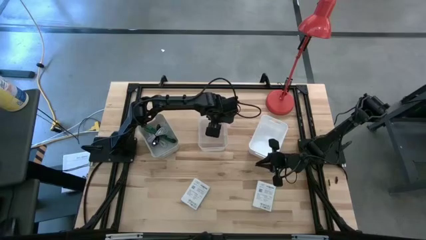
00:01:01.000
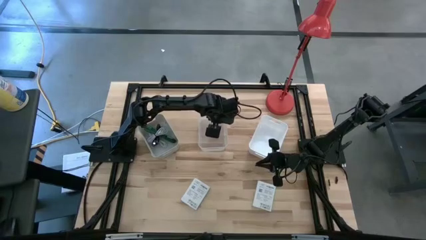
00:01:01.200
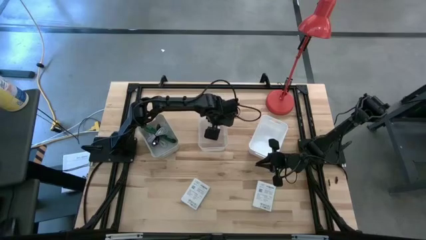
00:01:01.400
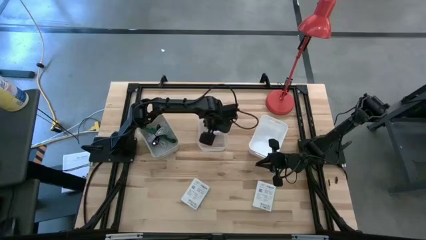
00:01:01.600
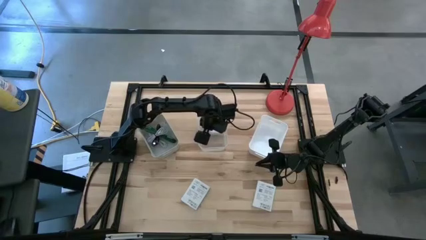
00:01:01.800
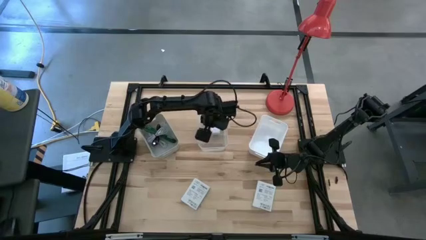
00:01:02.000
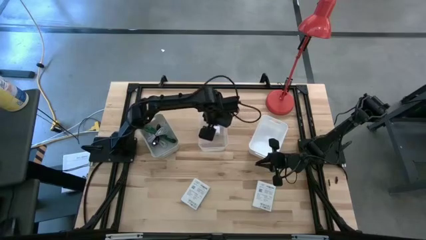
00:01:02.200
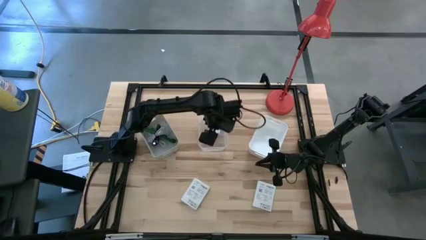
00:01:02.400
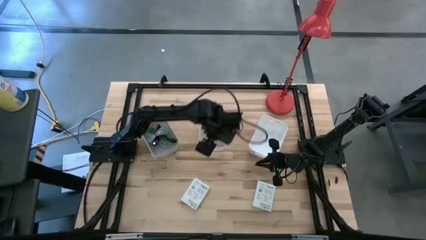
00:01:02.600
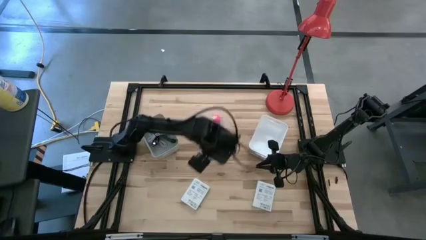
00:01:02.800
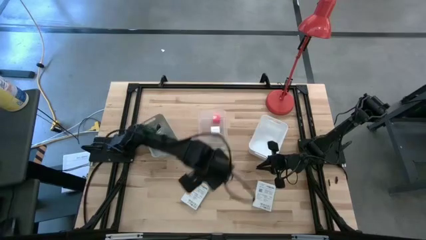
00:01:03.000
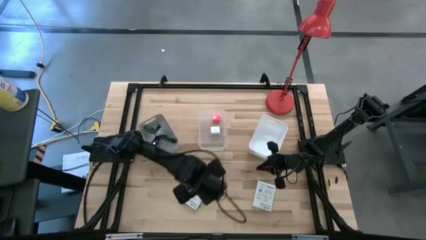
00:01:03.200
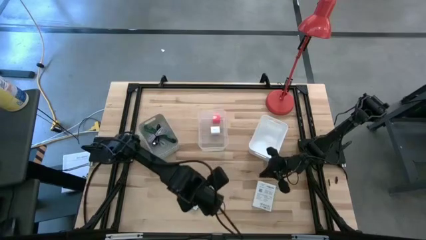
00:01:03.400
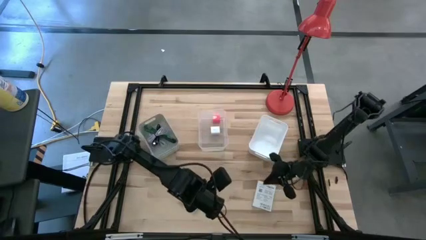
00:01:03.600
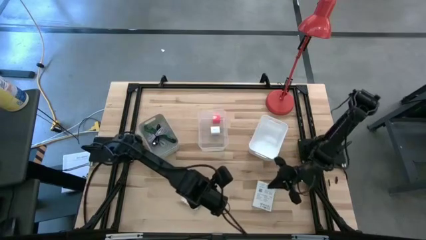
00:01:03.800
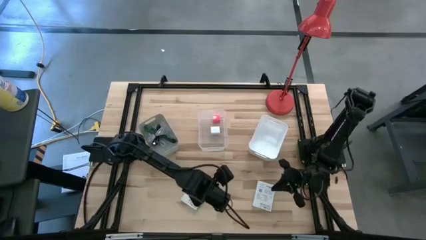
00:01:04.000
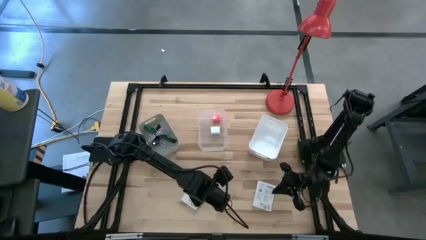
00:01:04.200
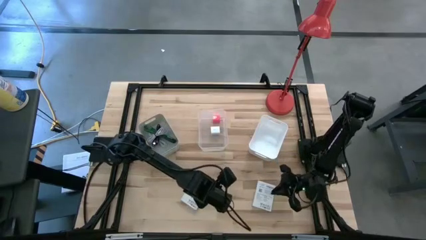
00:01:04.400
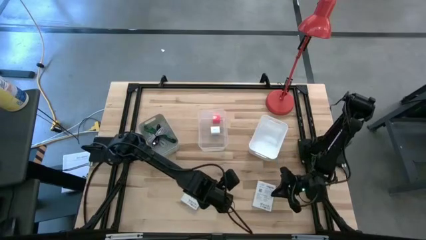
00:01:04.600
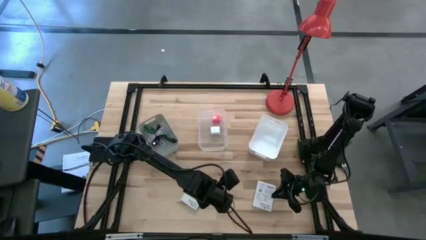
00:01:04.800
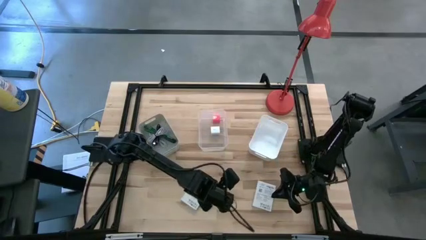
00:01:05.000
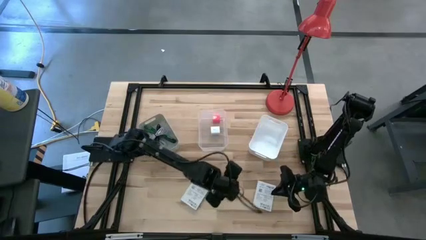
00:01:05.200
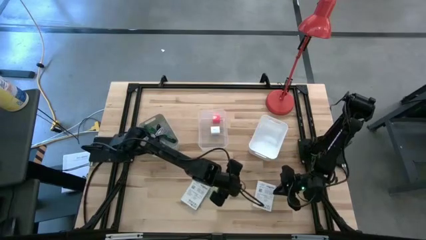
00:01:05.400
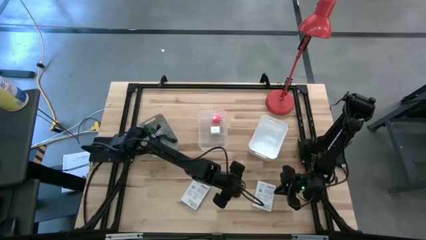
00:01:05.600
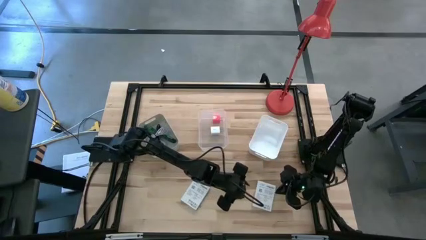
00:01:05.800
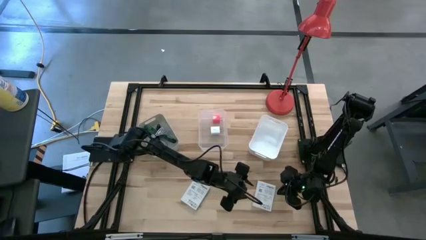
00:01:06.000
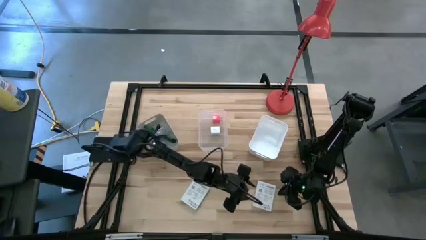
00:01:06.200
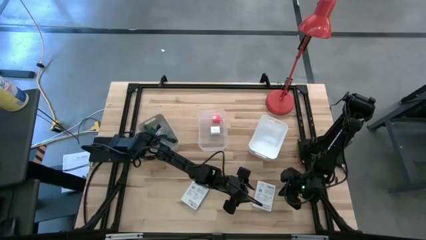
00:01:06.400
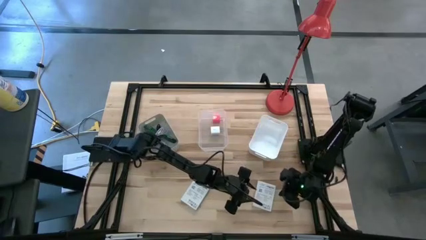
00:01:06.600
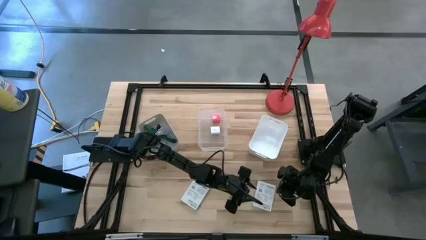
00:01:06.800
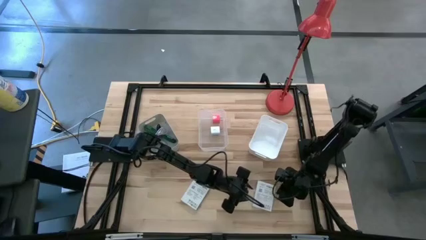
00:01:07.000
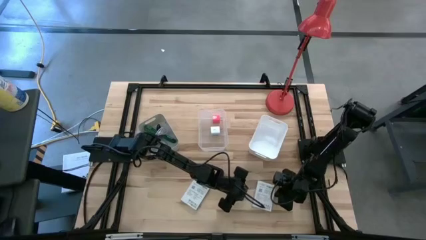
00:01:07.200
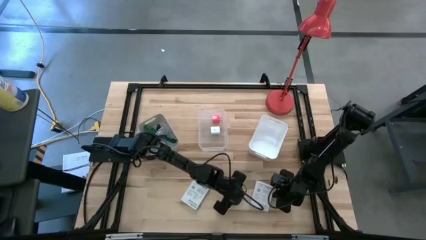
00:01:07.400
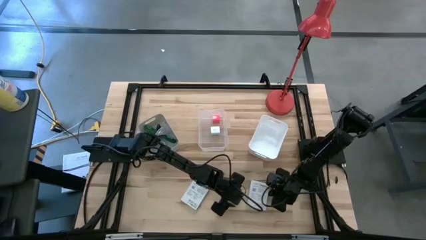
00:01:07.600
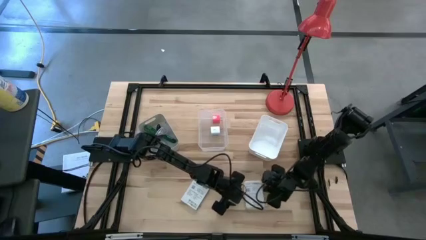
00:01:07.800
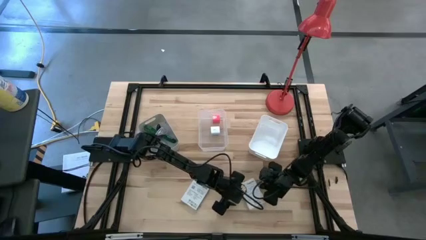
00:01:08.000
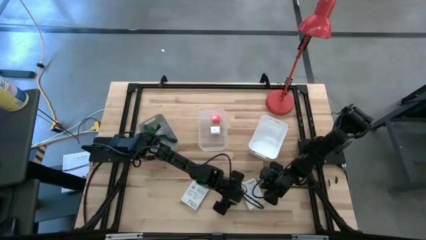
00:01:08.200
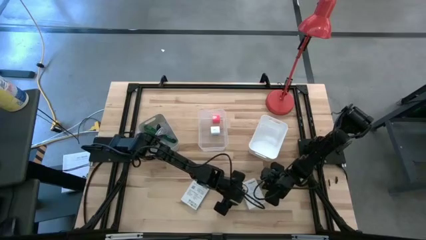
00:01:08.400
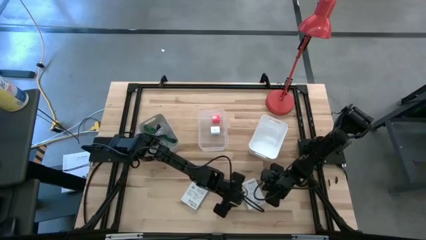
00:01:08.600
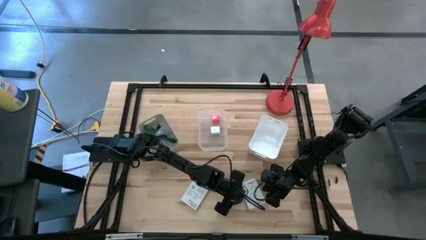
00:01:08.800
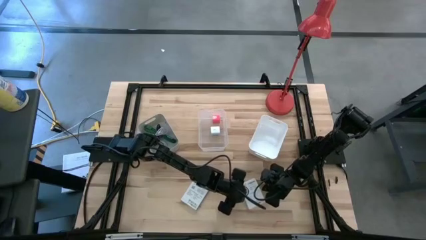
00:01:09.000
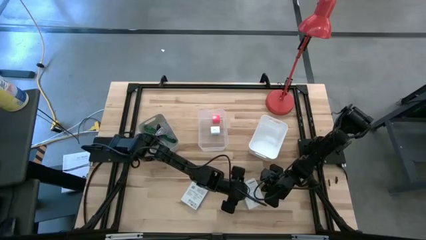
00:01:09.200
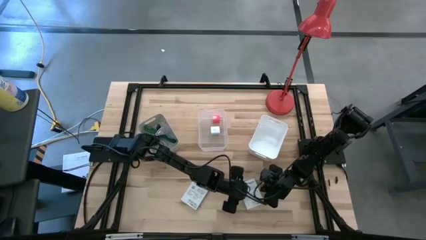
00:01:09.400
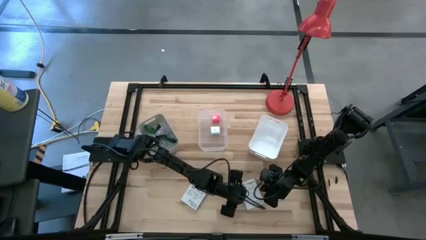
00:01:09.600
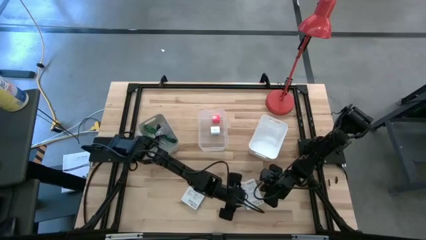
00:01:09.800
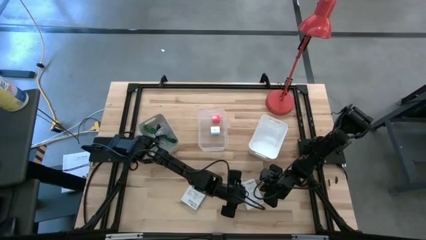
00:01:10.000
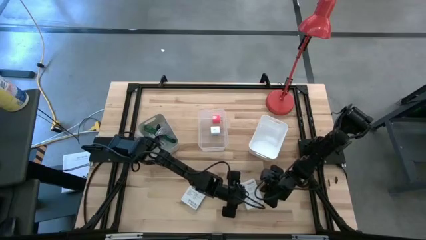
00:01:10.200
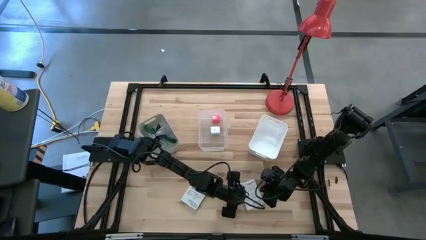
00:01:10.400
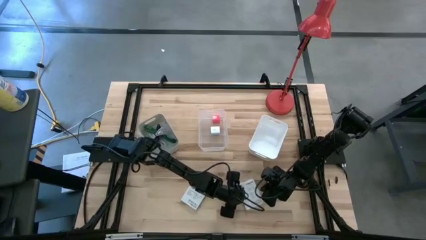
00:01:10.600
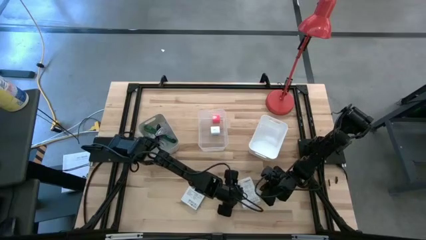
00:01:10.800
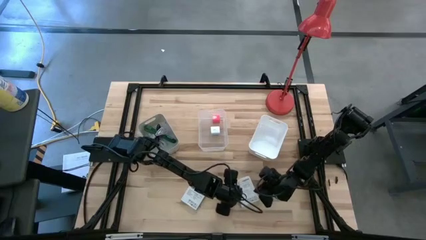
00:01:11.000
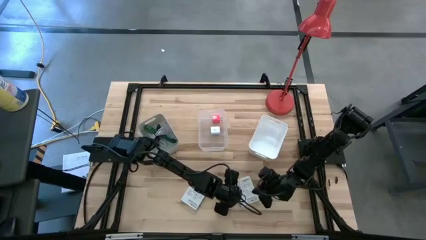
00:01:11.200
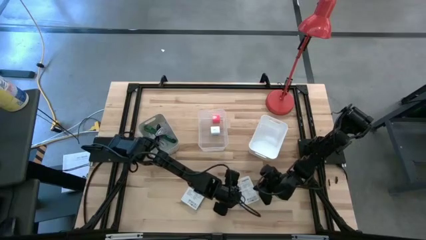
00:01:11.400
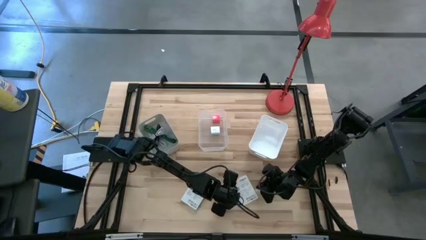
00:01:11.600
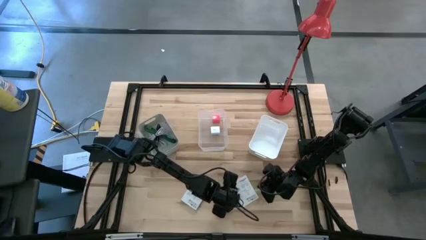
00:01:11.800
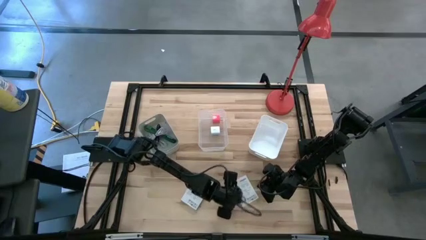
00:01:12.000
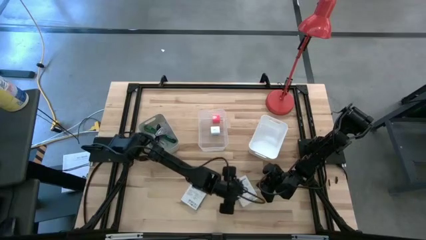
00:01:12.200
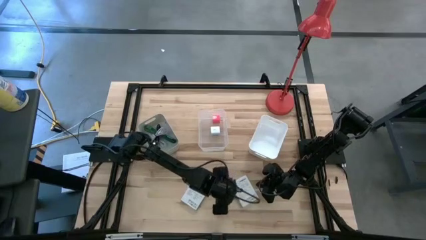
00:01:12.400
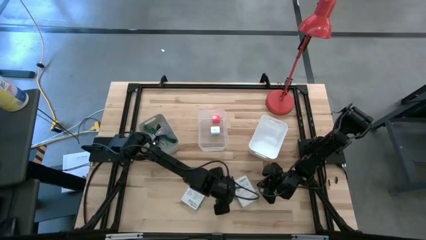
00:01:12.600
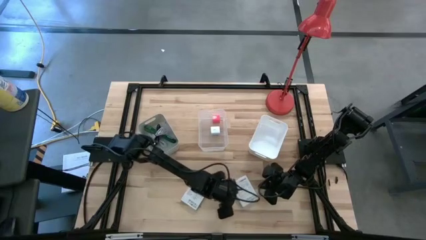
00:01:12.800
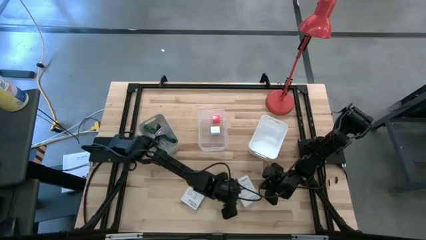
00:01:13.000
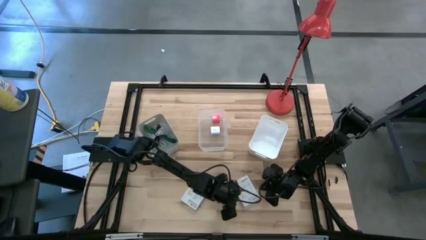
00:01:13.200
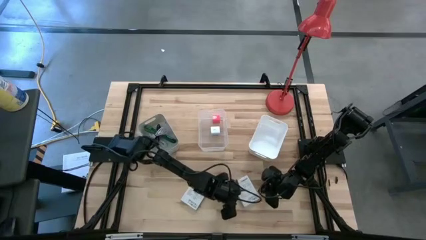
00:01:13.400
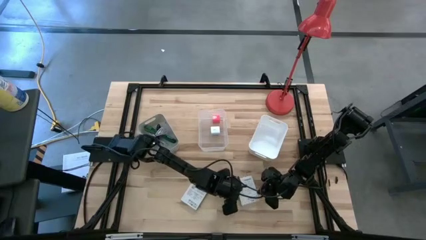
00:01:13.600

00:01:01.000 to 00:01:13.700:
Task: Pick and place items into bin
Put the right card reader box into the white bin

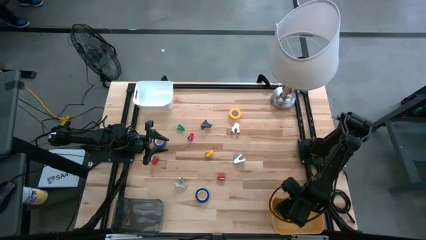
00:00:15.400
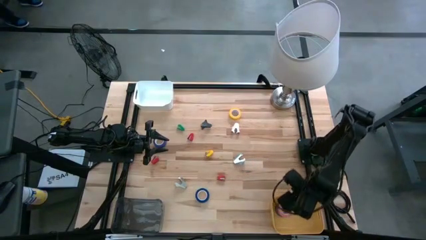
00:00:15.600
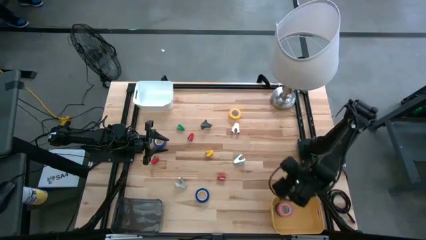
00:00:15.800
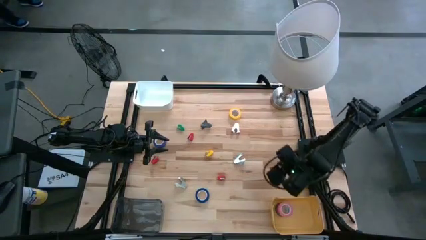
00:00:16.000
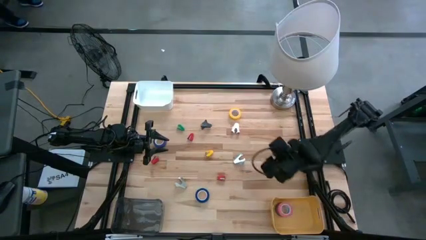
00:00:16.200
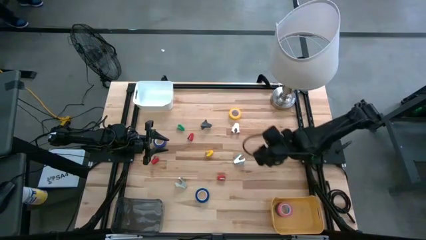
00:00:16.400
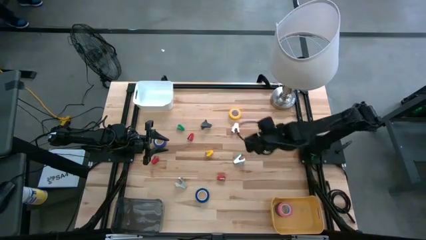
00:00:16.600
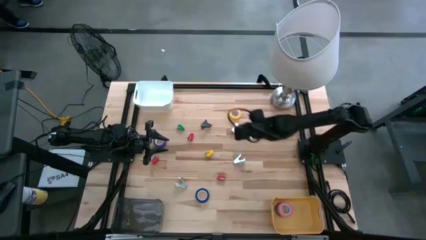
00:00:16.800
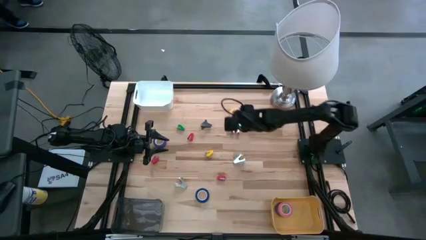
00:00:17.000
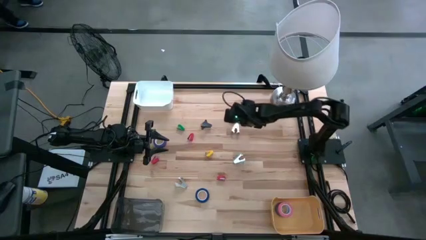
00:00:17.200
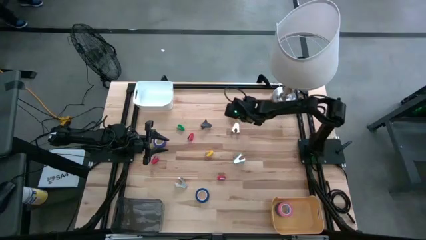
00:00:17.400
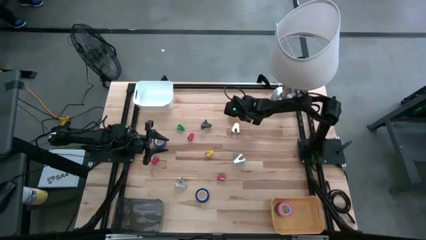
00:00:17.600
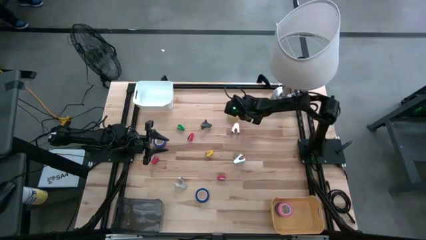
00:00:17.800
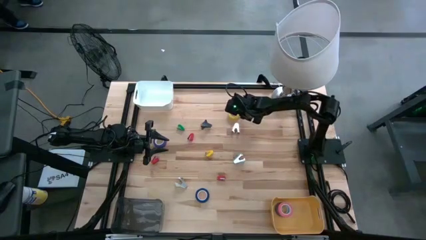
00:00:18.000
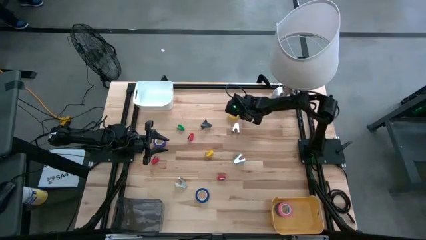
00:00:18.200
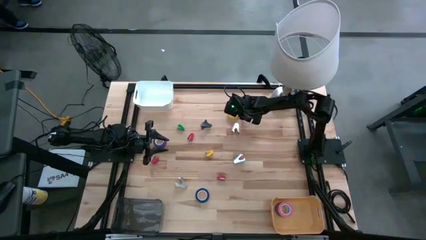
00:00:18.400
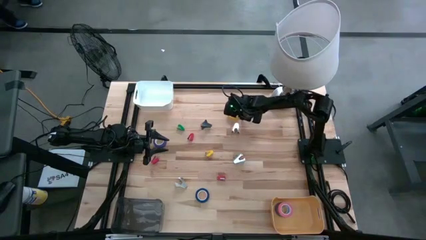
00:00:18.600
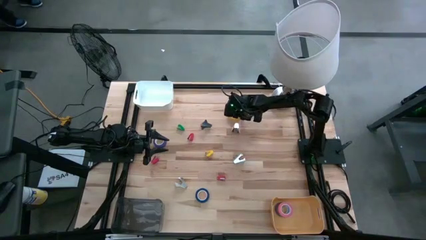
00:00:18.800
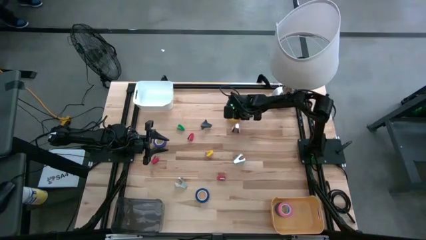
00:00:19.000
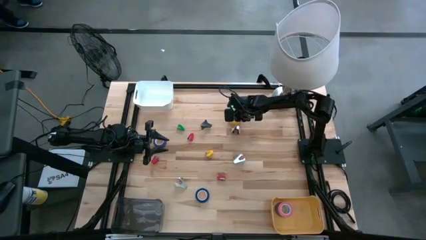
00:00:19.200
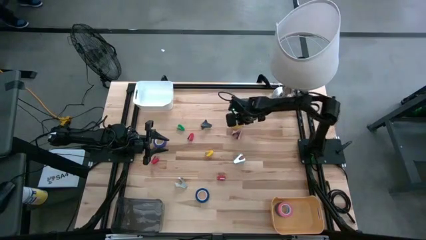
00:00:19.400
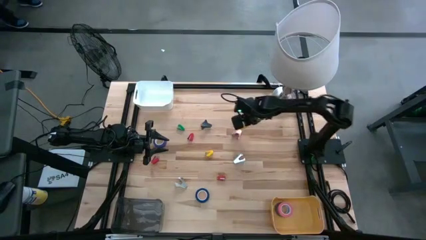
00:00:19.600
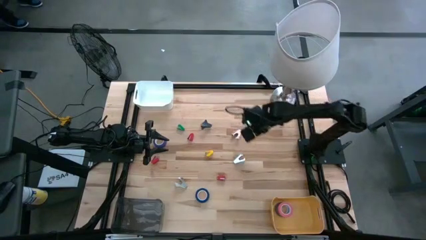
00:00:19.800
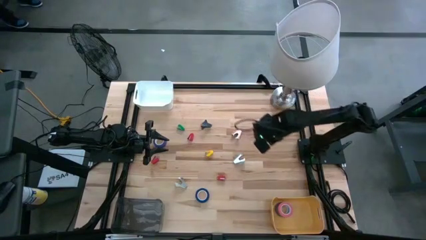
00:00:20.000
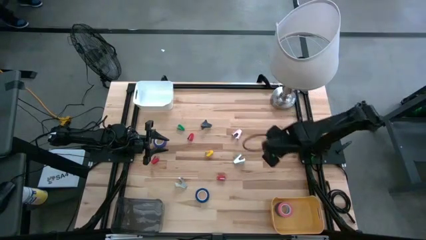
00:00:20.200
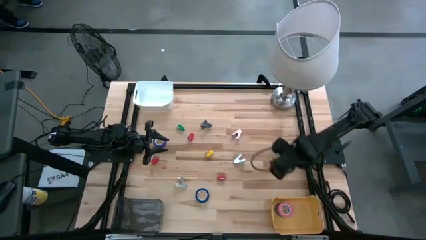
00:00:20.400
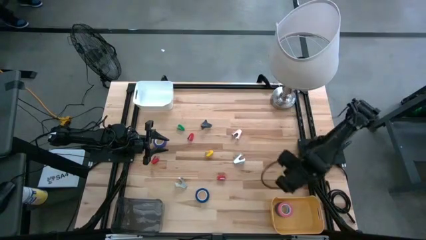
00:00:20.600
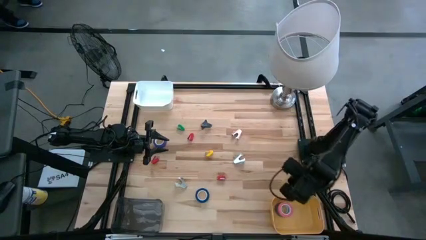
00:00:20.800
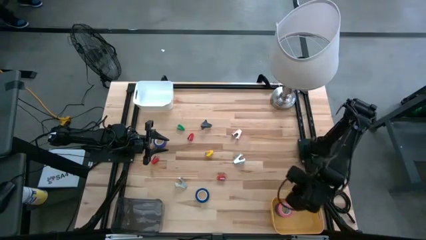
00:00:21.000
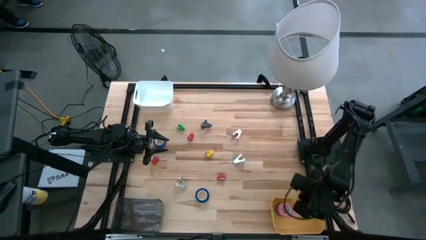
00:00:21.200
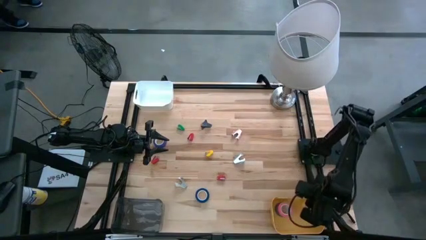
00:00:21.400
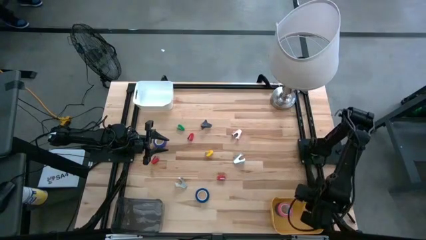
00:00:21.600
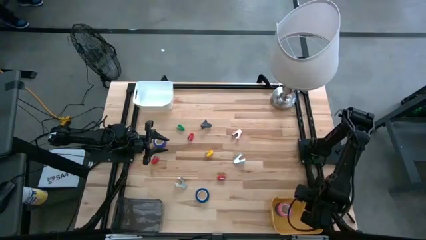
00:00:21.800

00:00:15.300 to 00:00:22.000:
Task: Pick and place Stapler, Stapler remover, tape
Put the yellow tape into the yellow bin
